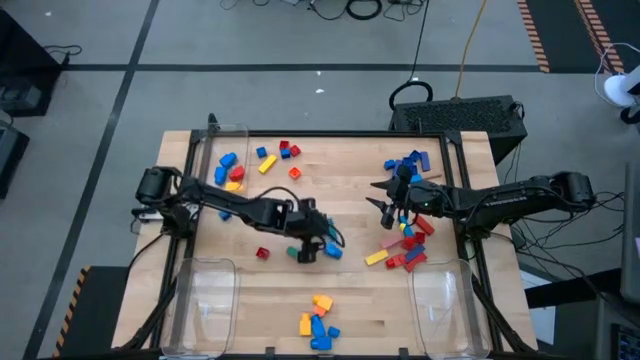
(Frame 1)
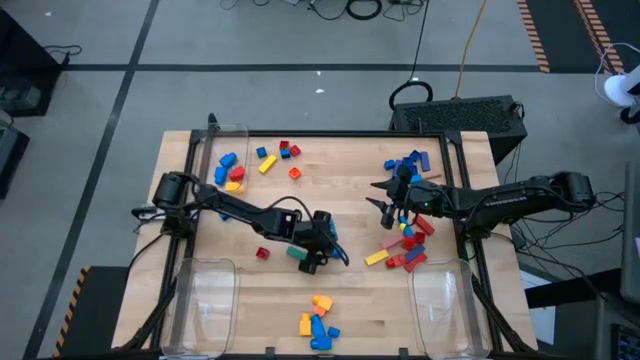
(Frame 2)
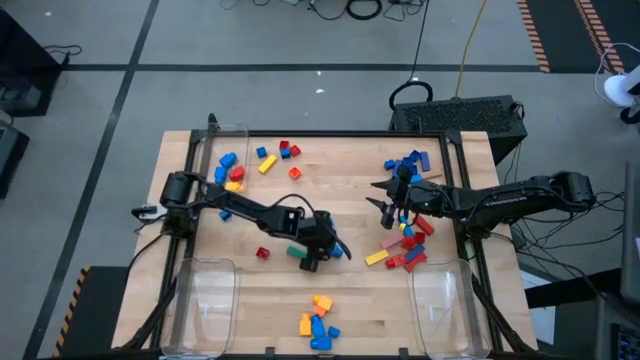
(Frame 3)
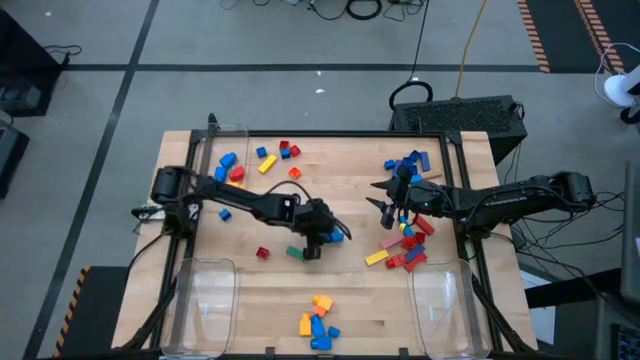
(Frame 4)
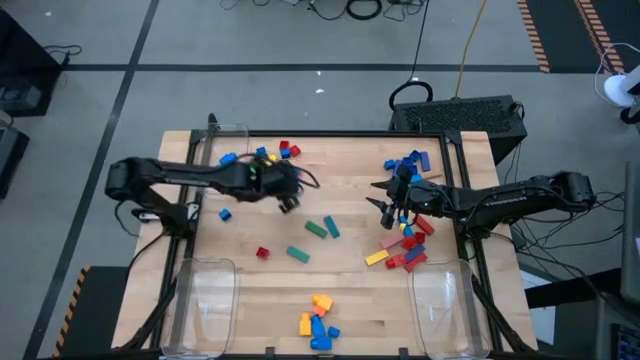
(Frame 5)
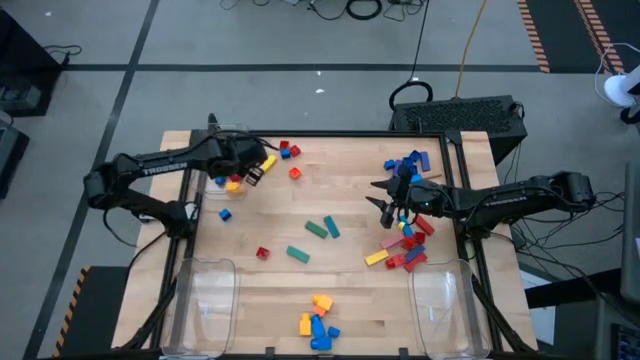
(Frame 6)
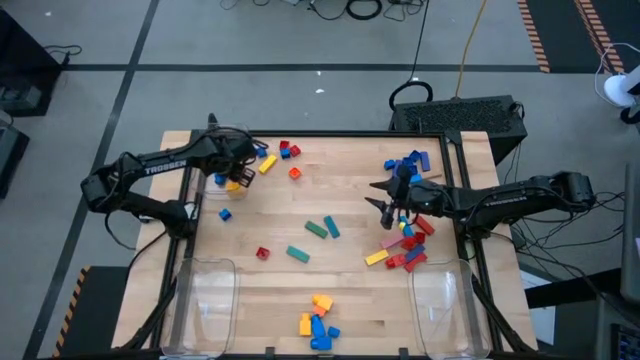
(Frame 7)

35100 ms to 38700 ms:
Task: Sort blocks by size
Put the blue one stud game piece into the top left transparent bin

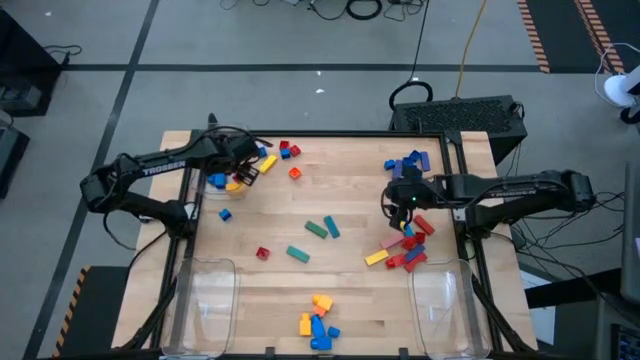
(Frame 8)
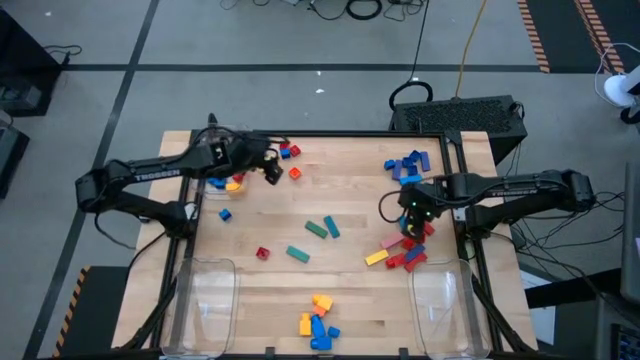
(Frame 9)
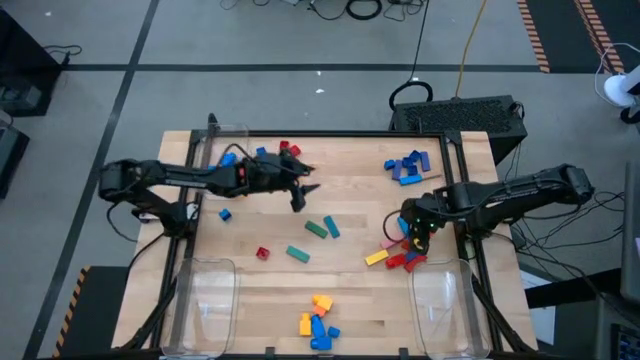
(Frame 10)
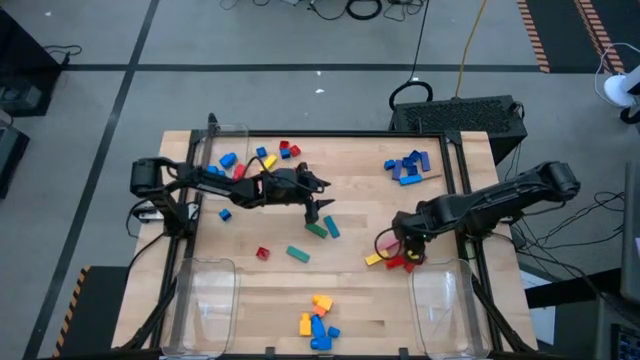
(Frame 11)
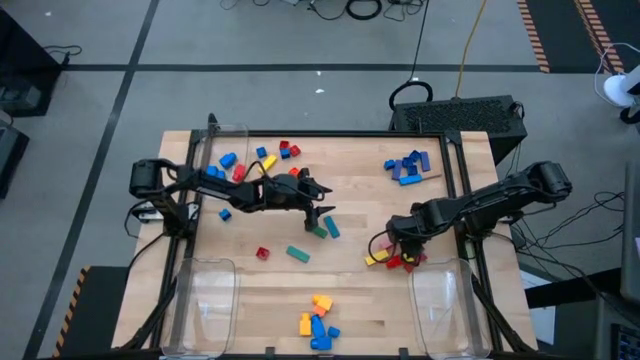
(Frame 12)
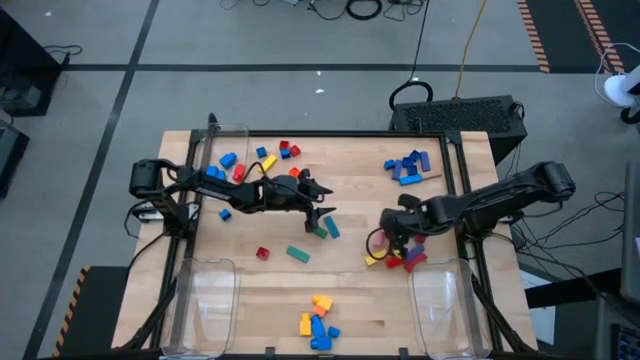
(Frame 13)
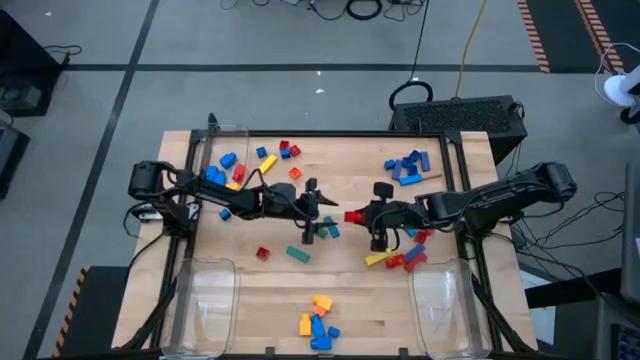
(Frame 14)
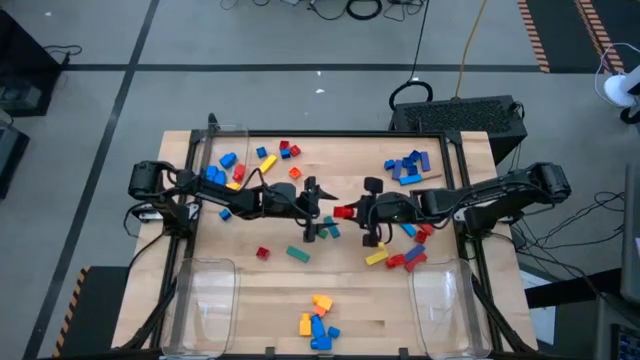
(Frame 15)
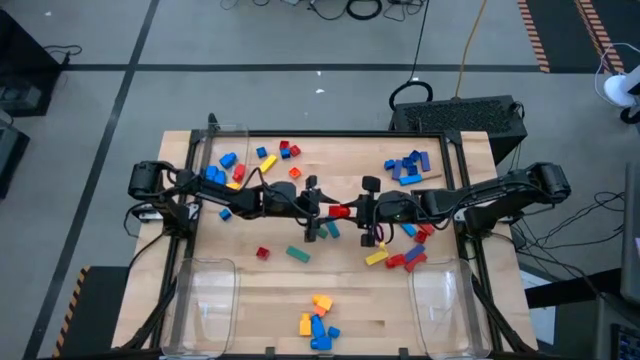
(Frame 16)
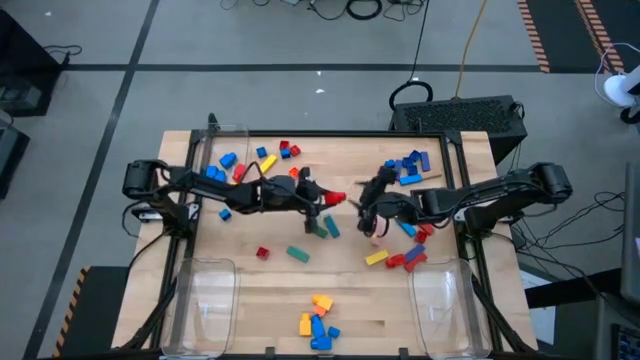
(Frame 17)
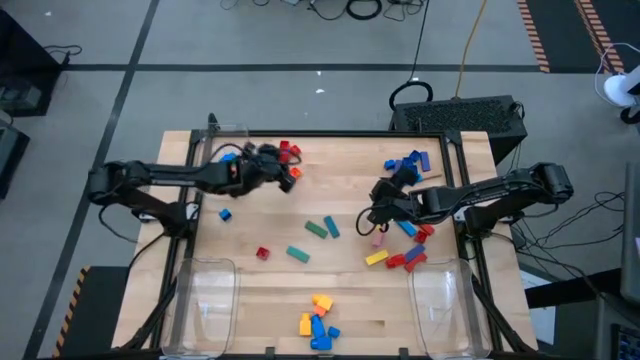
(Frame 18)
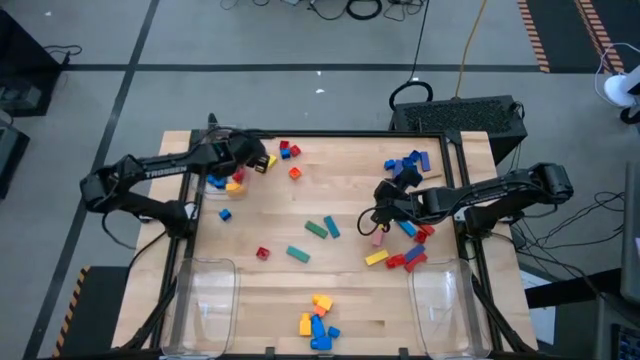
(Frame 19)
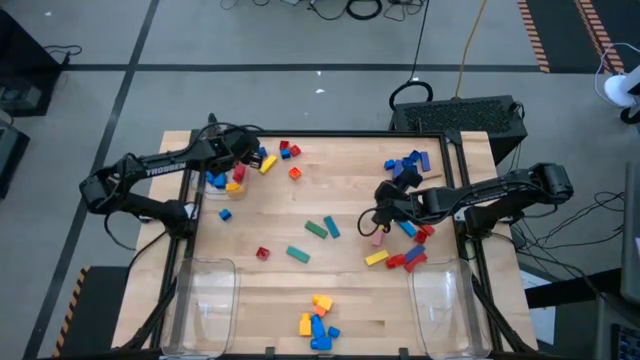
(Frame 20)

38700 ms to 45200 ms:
Put the red one stud game piece into the top left transparent bin

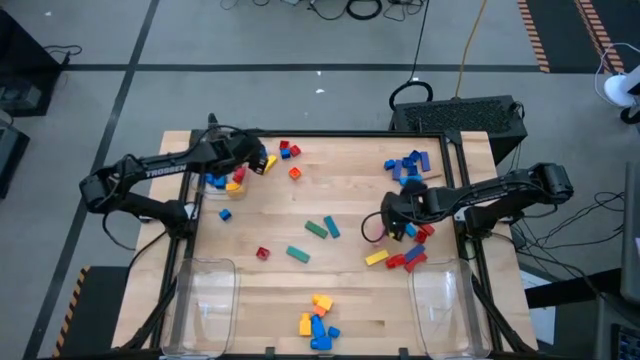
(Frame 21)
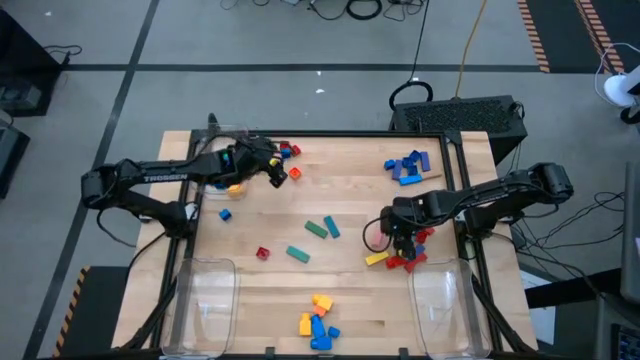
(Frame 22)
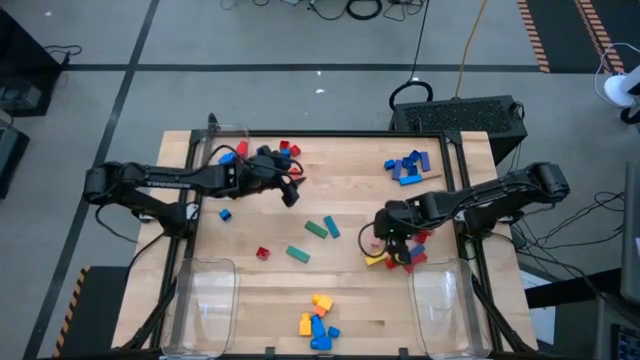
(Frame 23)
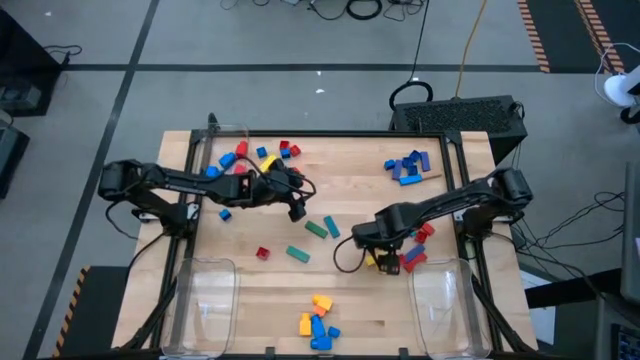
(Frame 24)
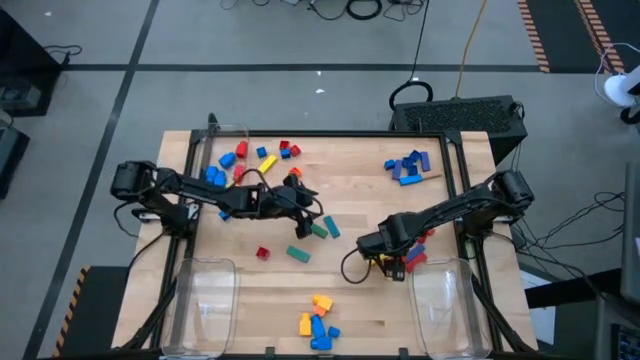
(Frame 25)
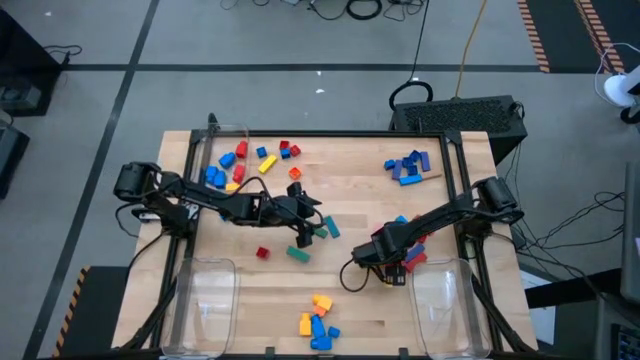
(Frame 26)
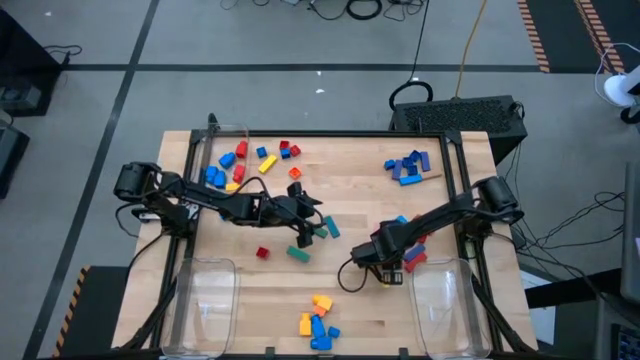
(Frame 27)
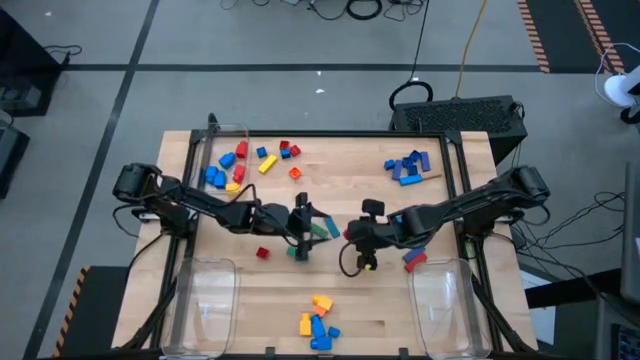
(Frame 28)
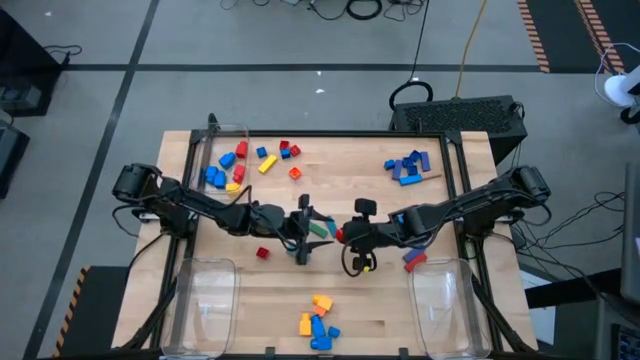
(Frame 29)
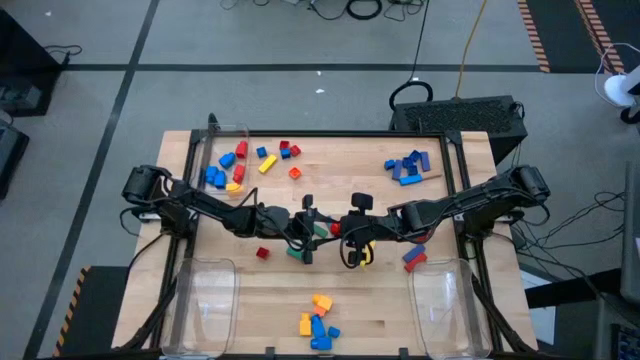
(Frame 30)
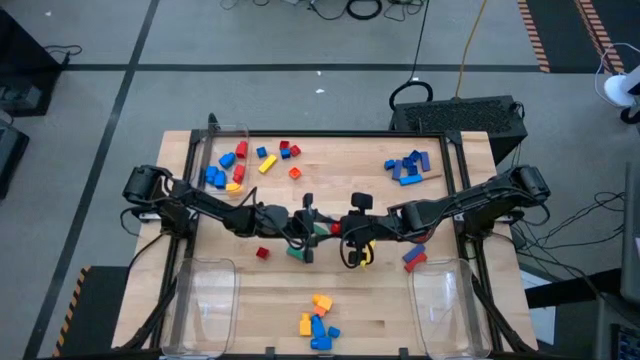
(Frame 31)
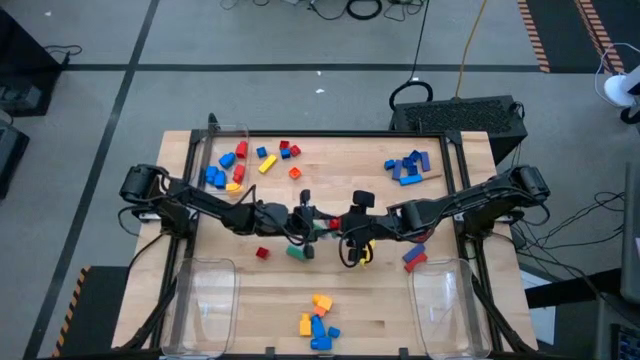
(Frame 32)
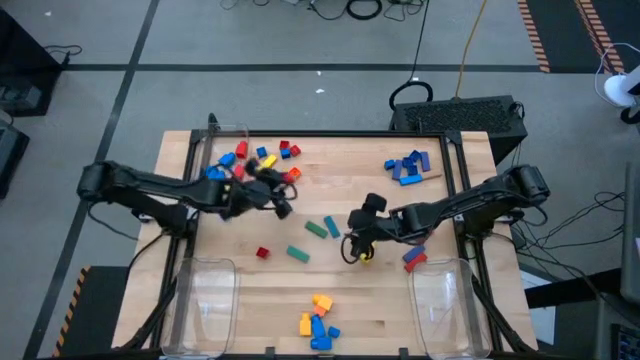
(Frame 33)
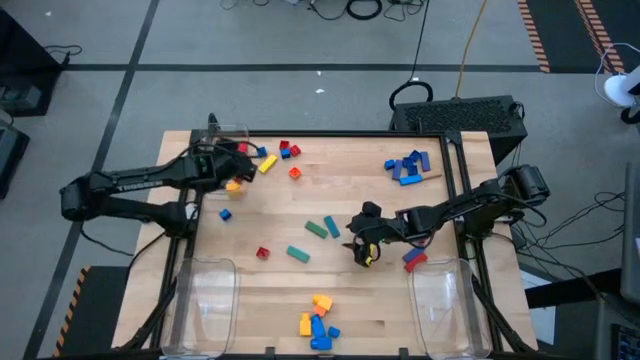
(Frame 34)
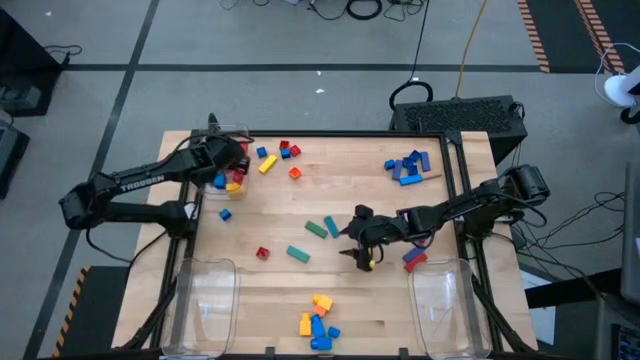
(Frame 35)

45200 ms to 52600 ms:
Put the red one stud game piece into the top left transparent bin

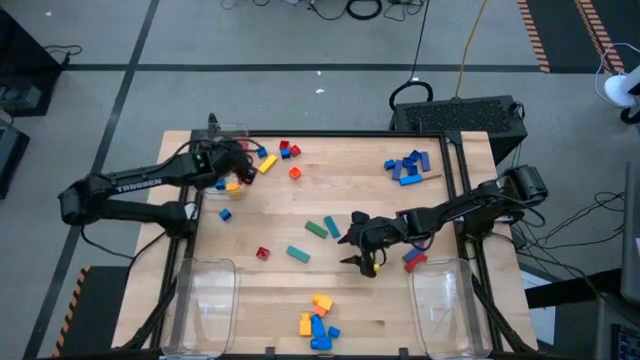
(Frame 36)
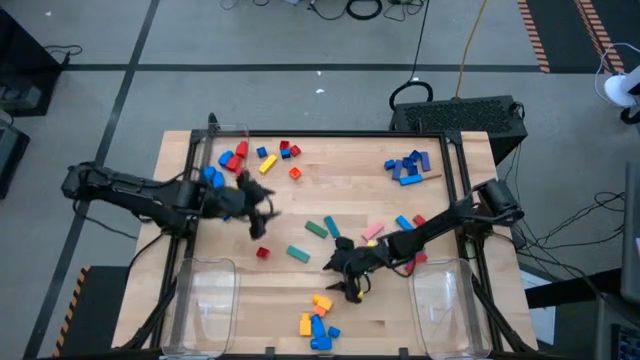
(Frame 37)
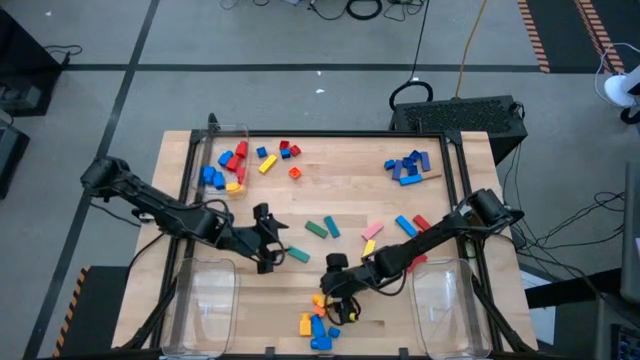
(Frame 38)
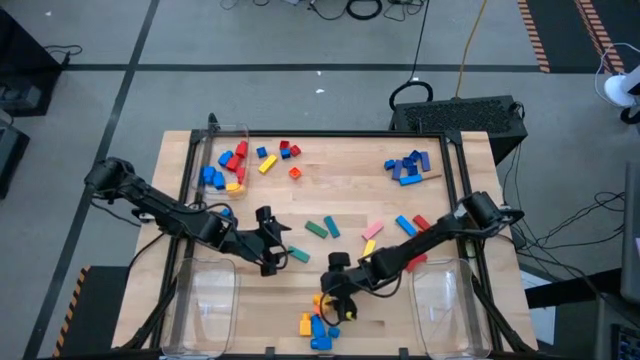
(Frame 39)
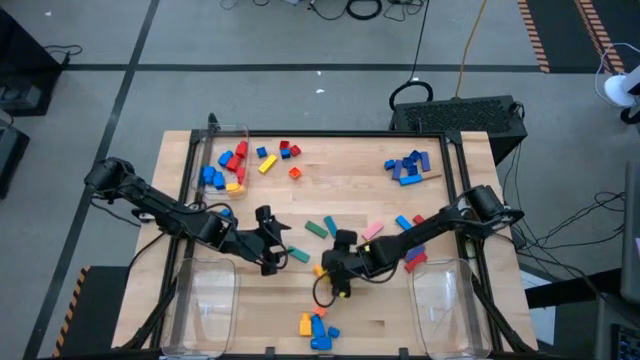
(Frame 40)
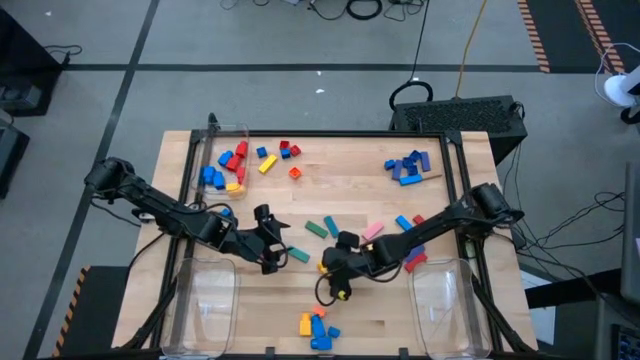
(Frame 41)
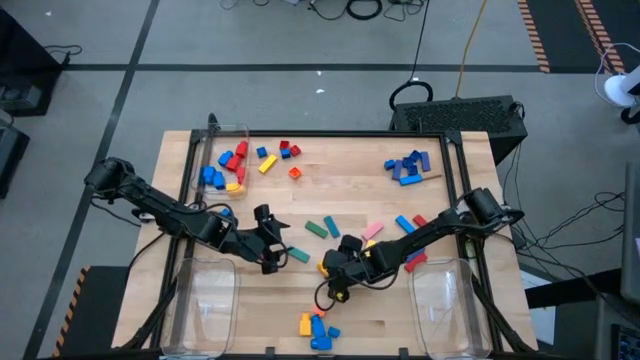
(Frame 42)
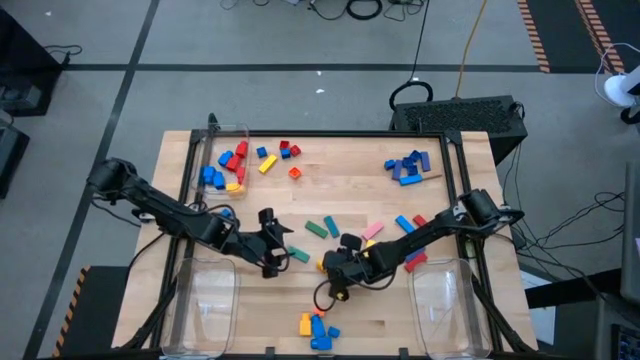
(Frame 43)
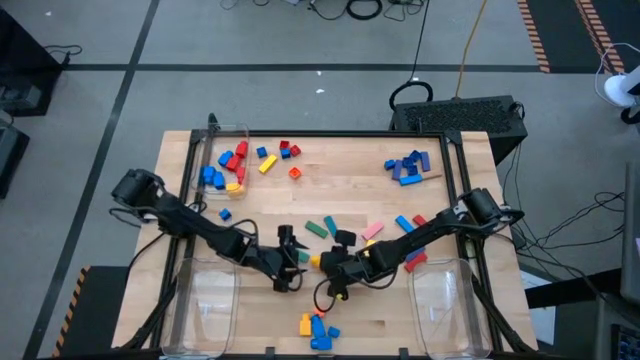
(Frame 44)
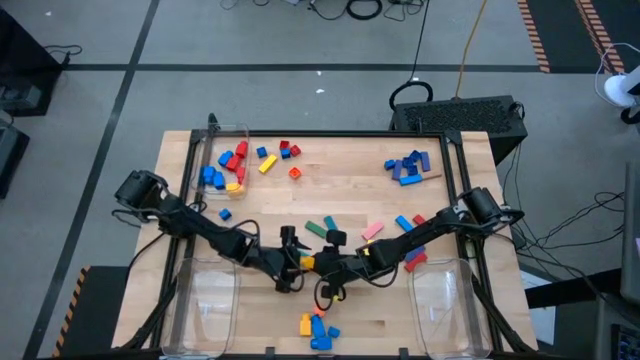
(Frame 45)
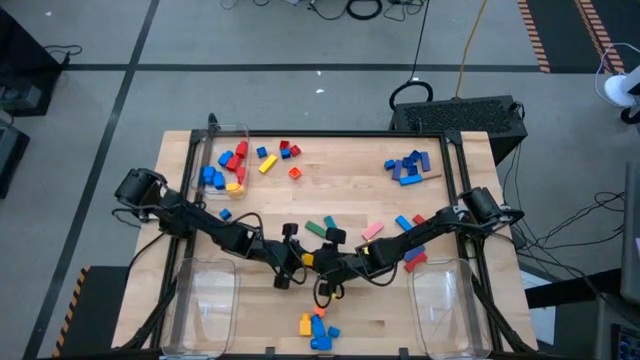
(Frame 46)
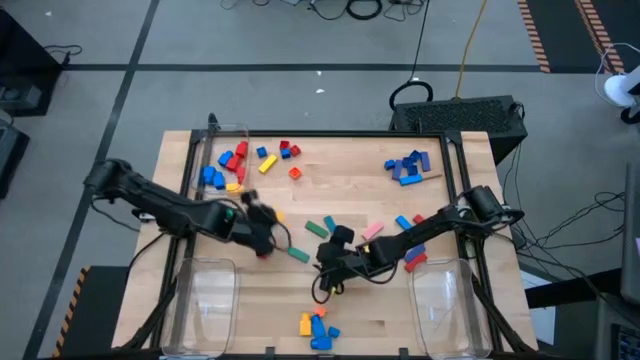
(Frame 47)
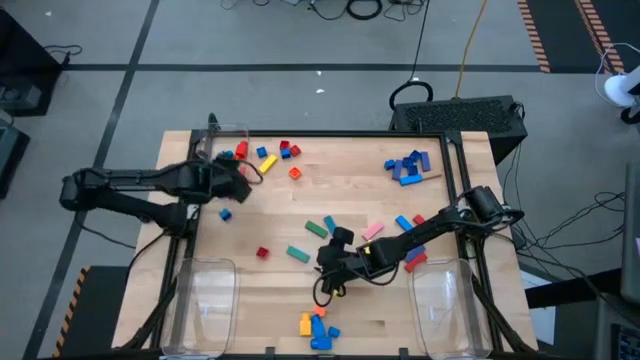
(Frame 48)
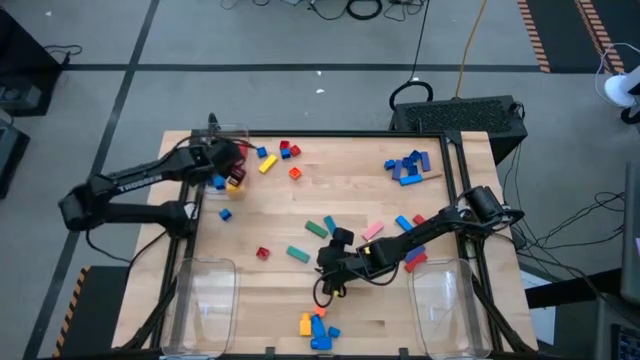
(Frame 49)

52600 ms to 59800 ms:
Put the yellow one stud game piece into the top left transparent bin
